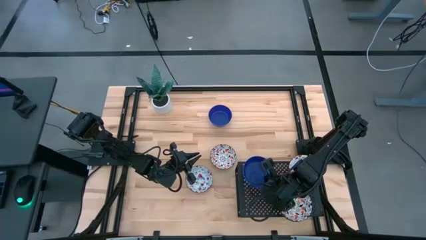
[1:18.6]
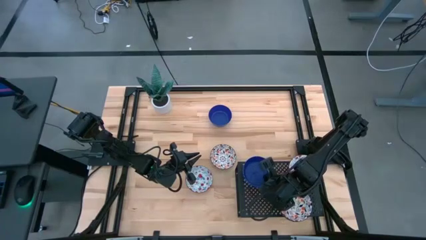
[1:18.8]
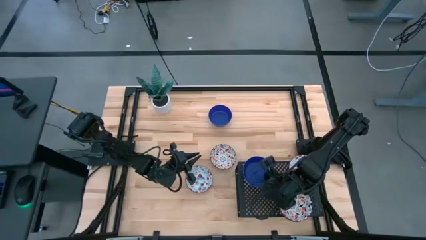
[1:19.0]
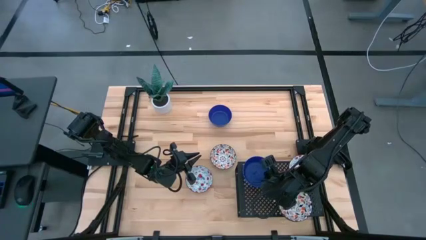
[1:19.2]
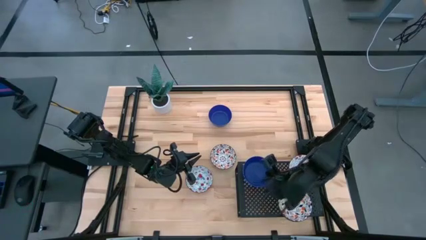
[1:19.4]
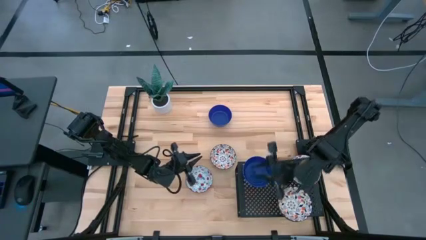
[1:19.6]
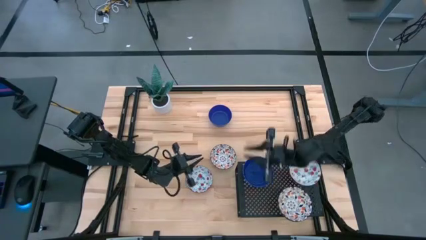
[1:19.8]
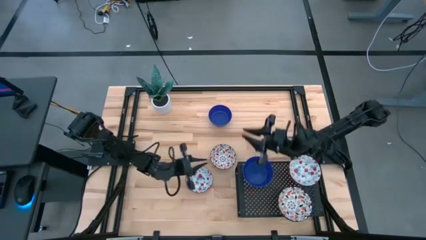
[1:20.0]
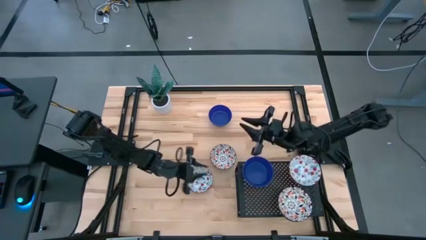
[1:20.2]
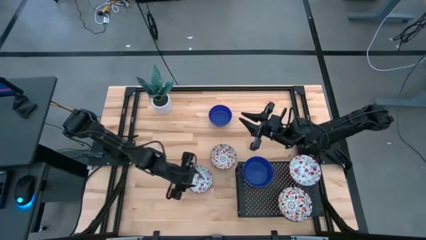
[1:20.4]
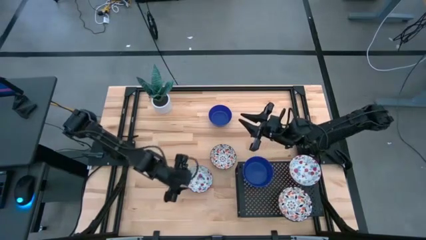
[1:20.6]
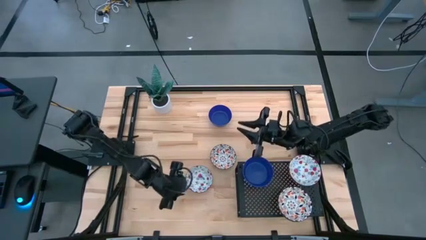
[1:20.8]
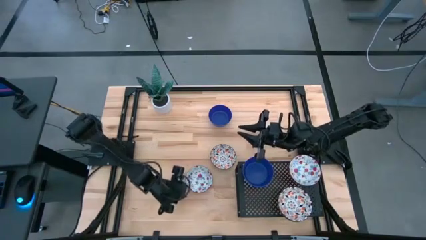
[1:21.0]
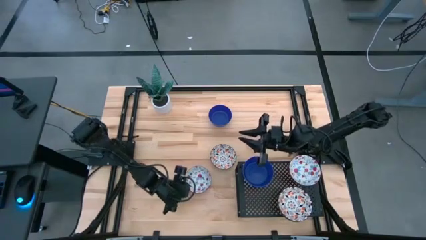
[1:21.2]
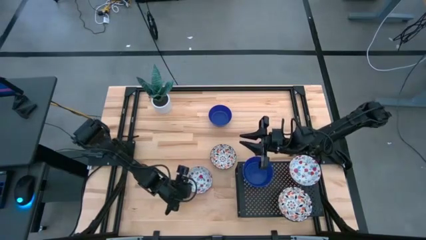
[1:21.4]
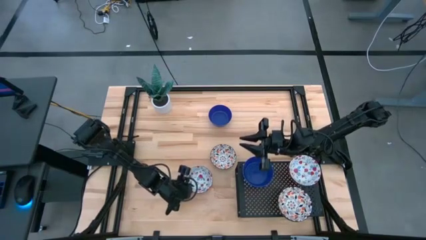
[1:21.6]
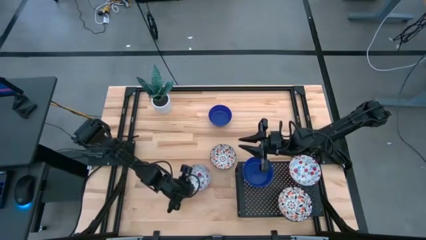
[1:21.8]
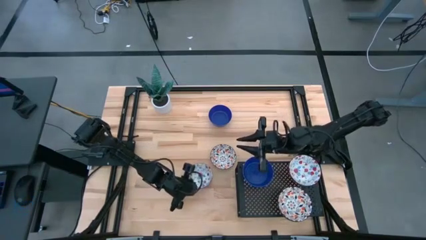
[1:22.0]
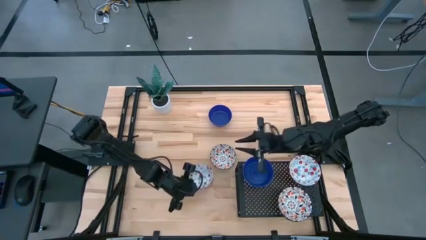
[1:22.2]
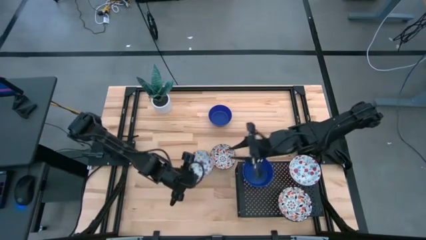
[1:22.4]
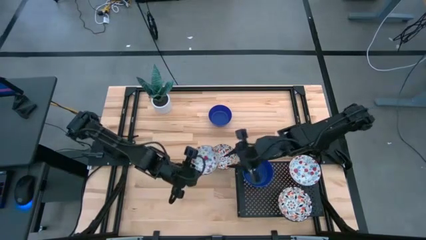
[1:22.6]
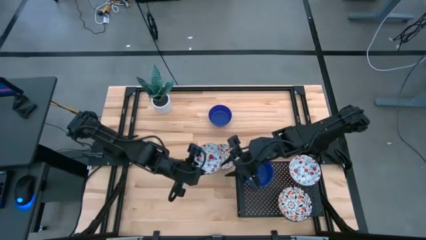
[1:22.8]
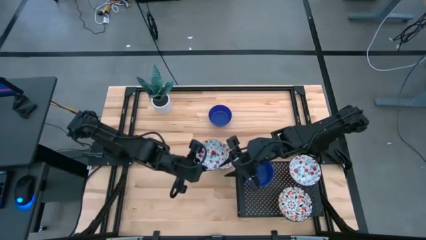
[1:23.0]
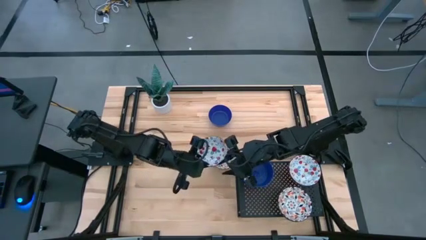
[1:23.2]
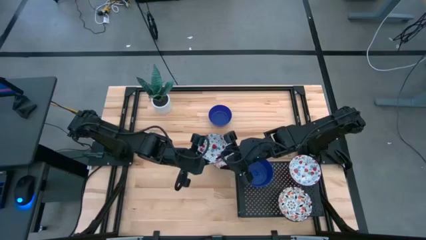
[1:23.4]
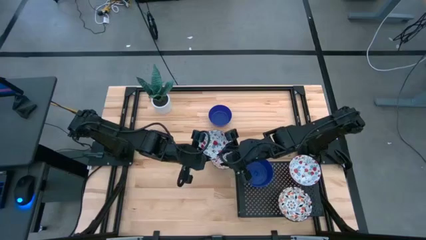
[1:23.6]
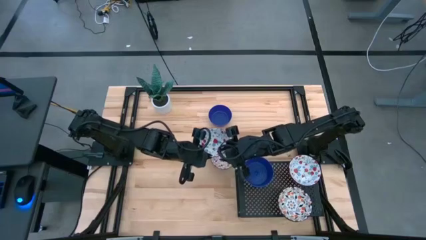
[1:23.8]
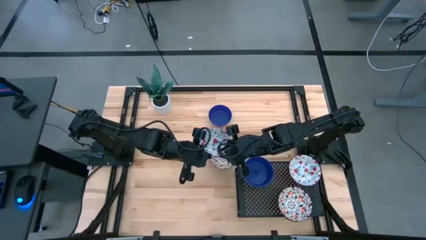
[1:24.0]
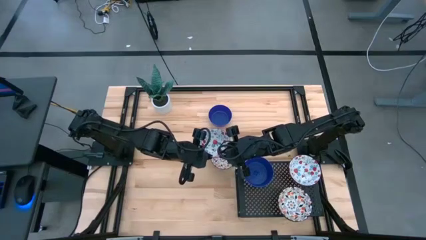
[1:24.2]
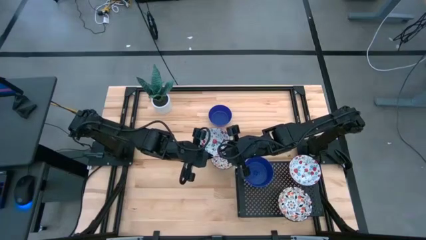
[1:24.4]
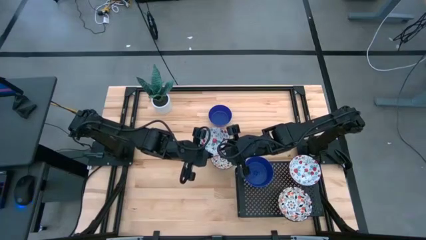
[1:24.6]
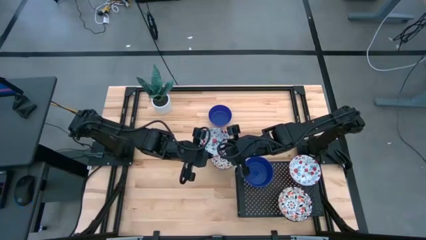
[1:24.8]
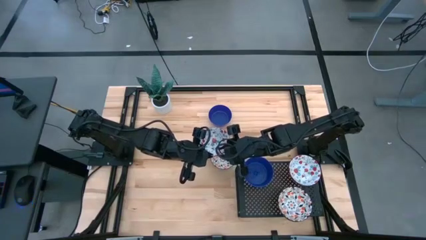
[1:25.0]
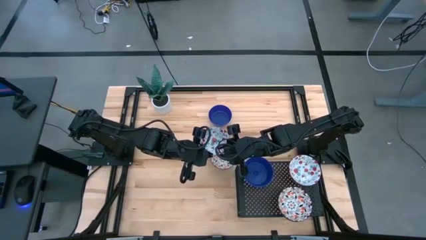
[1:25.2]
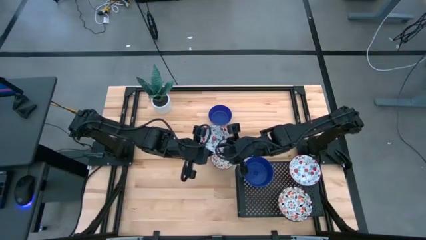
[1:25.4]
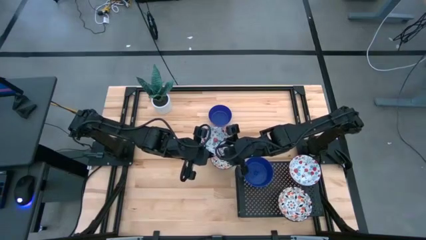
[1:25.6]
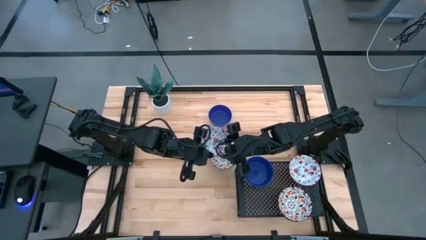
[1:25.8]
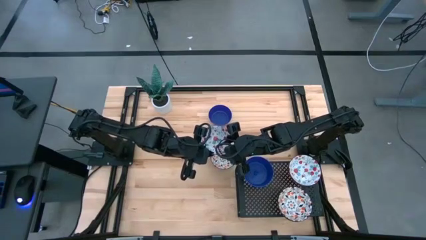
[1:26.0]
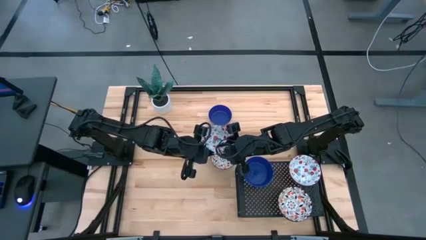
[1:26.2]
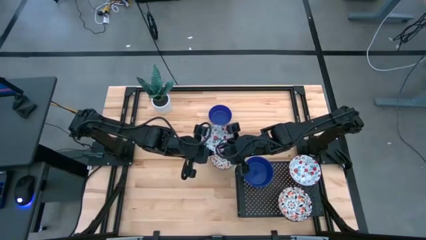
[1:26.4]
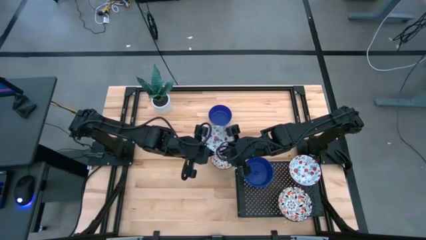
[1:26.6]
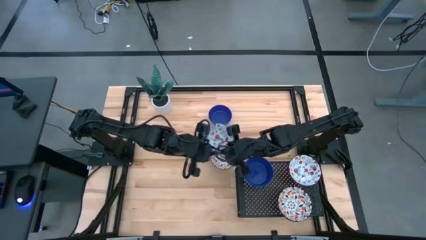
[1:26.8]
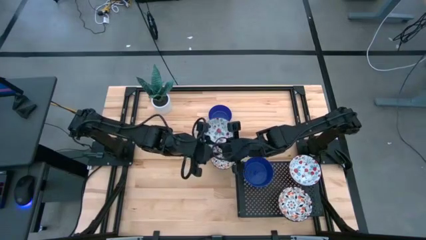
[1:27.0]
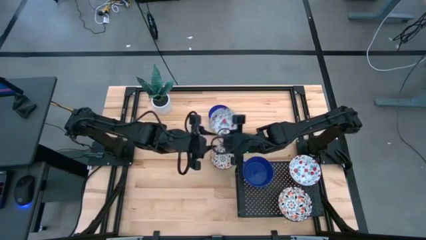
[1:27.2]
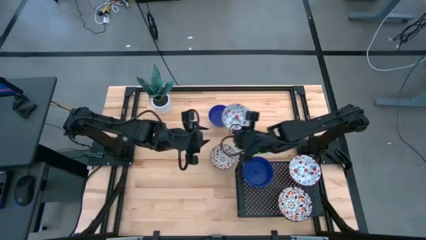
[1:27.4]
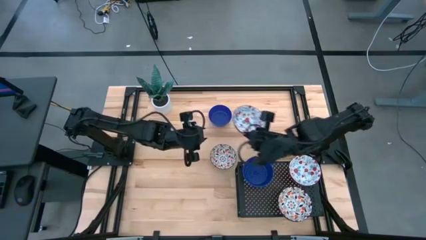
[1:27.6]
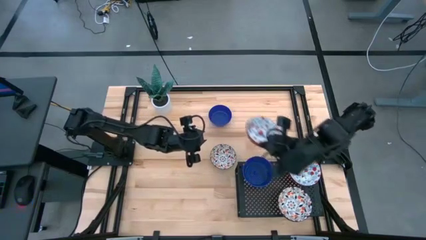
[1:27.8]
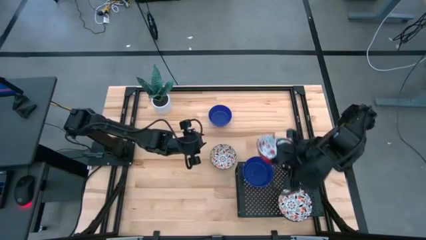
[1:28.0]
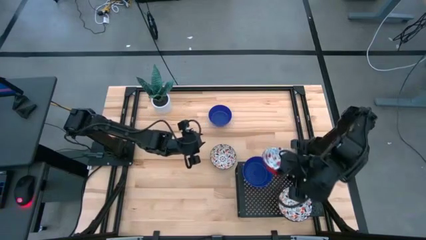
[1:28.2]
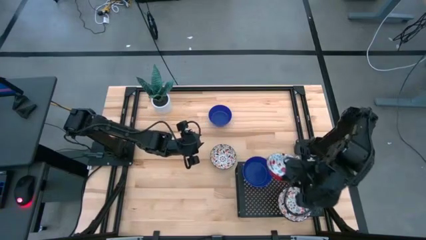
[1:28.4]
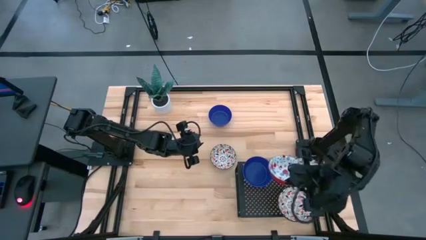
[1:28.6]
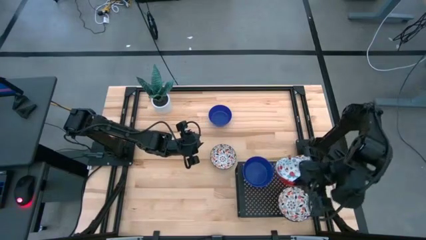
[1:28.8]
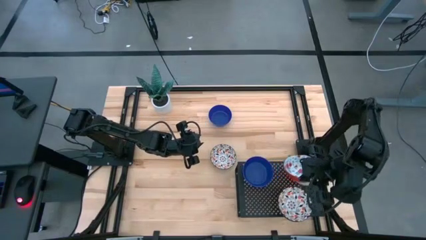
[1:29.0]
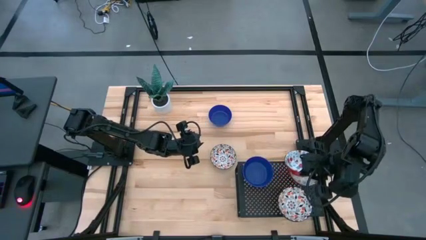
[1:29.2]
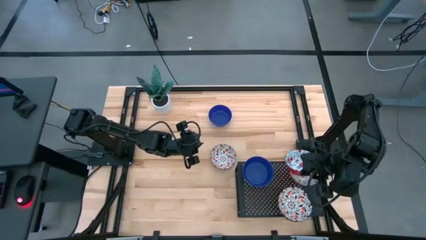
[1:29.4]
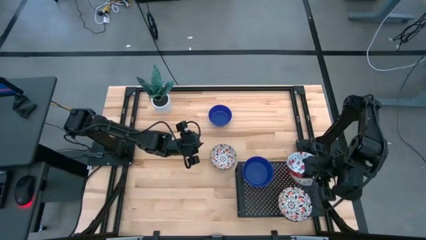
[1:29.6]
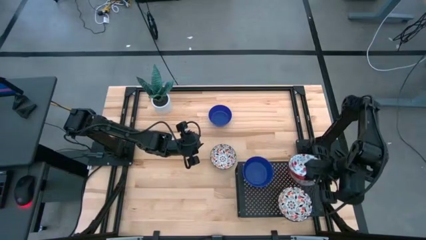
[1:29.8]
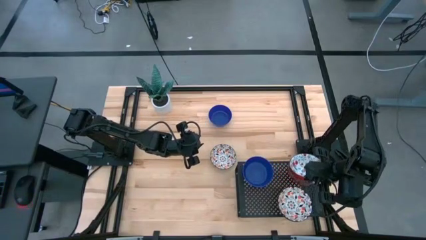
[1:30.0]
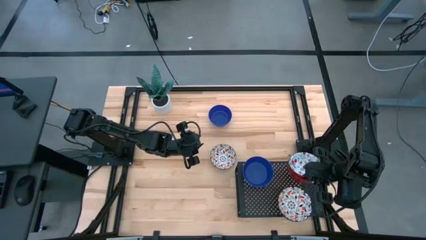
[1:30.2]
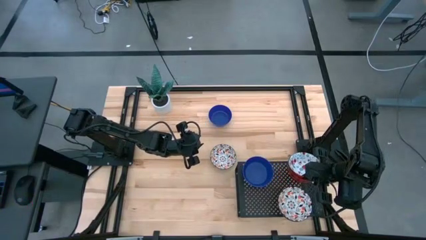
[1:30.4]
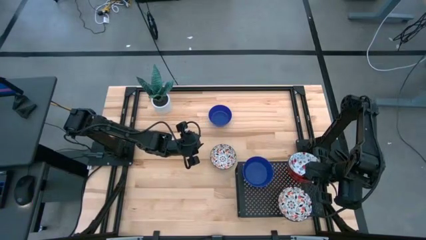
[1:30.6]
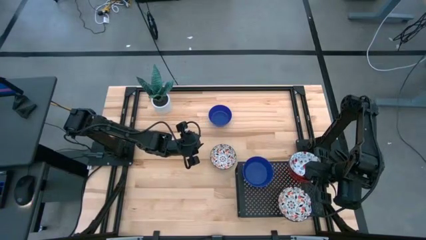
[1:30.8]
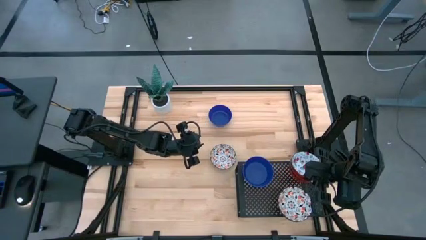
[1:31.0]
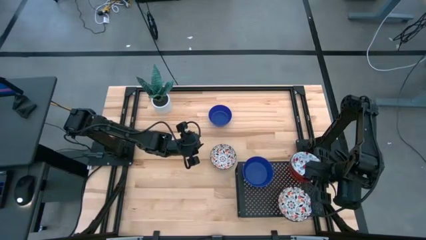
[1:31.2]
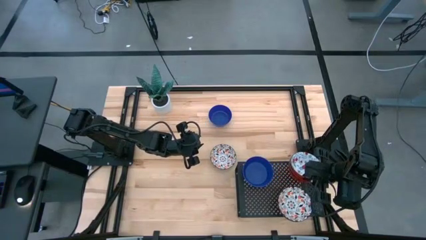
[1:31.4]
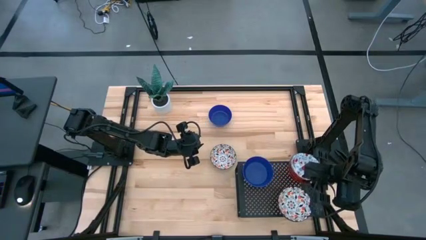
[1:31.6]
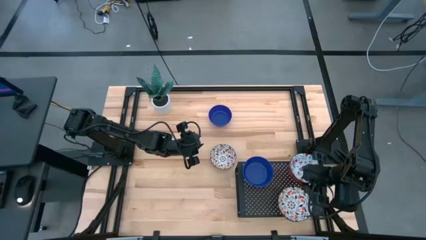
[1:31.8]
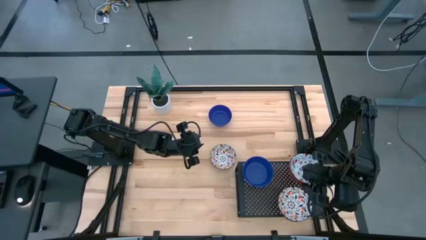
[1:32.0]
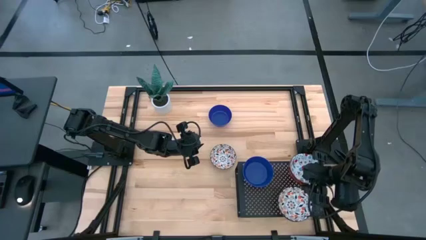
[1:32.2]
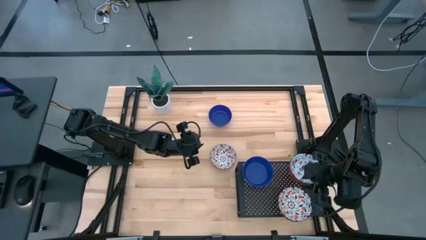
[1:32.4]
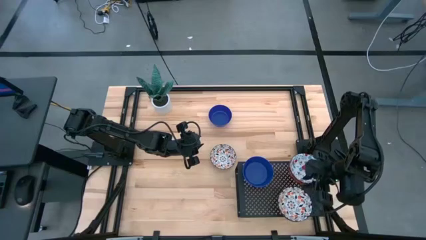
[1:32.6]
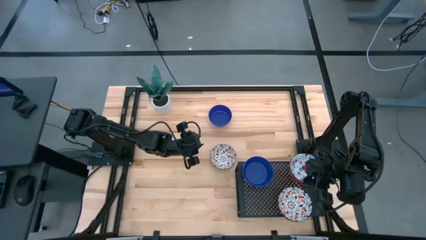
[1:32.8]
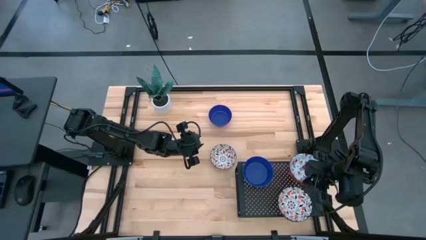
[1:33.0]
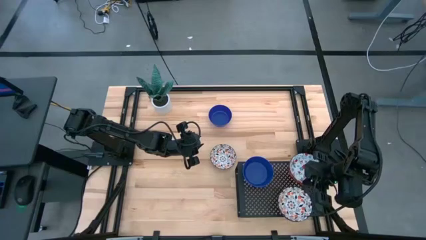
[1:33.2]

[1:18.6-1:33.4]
Task: Pick & Place Mini bowls
Stack the red patterned bowl on the red patterned bowl on the shelf
